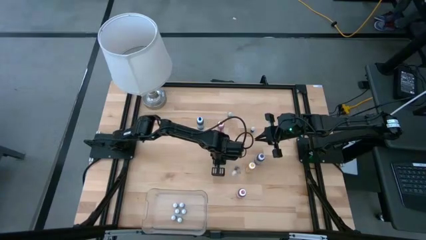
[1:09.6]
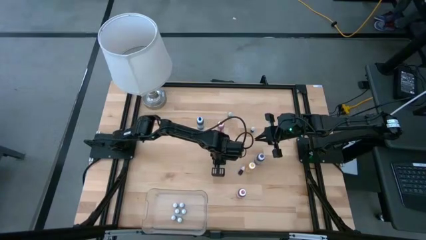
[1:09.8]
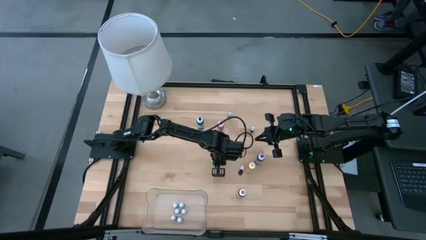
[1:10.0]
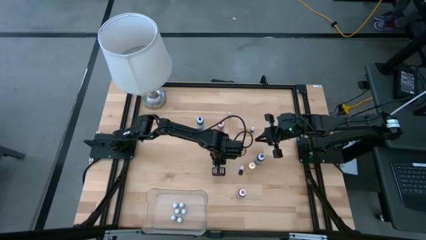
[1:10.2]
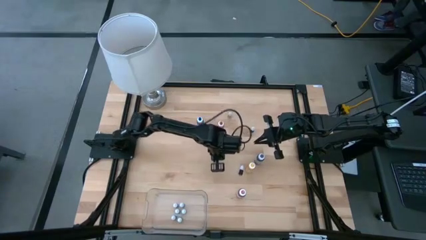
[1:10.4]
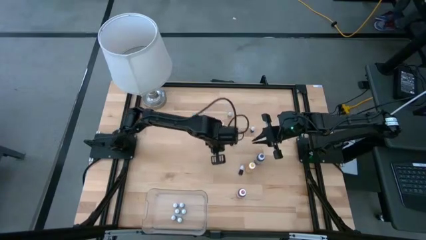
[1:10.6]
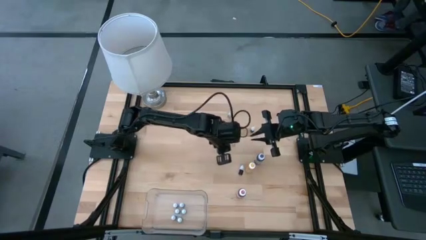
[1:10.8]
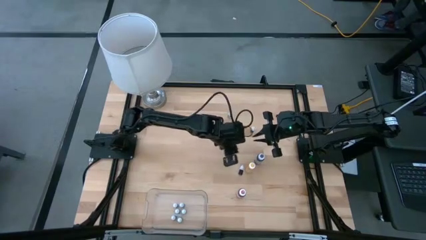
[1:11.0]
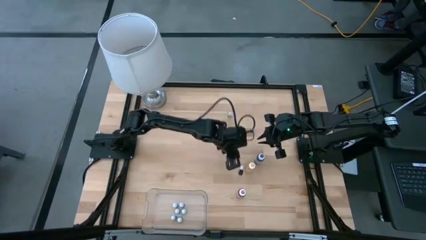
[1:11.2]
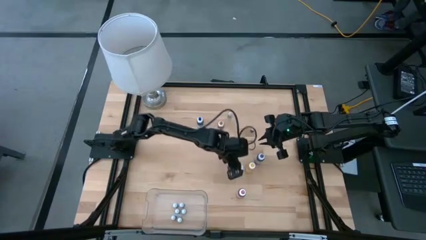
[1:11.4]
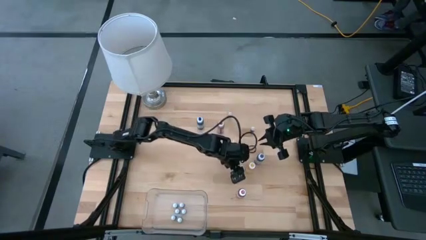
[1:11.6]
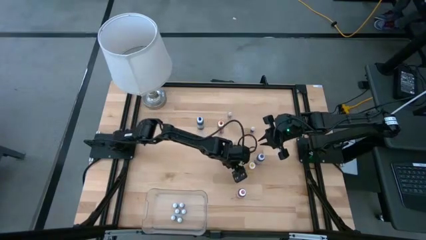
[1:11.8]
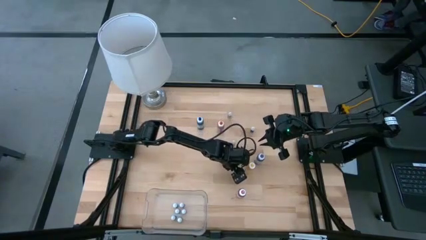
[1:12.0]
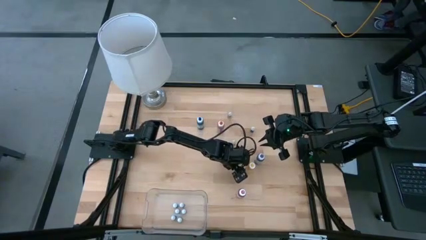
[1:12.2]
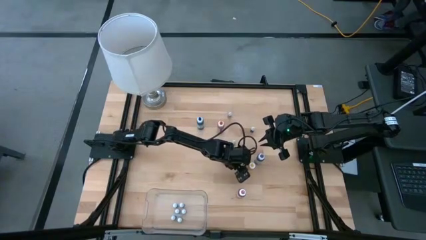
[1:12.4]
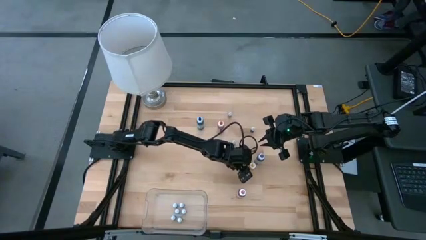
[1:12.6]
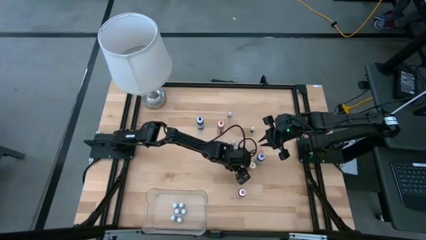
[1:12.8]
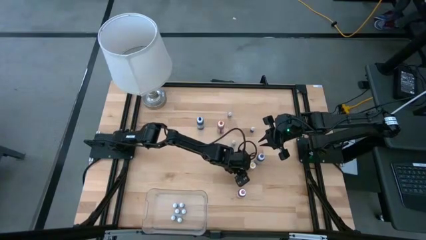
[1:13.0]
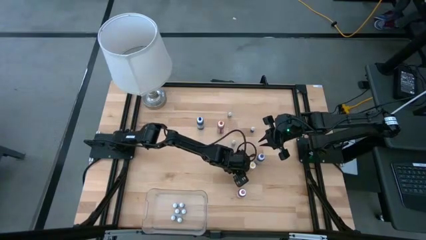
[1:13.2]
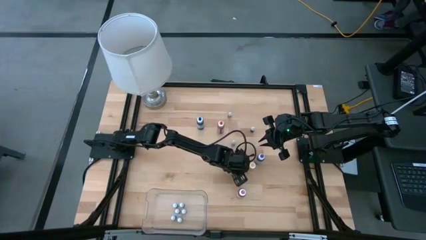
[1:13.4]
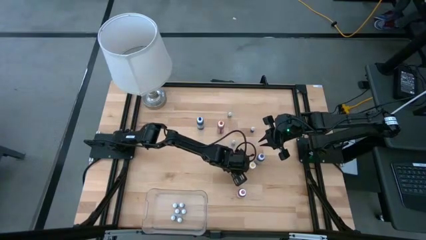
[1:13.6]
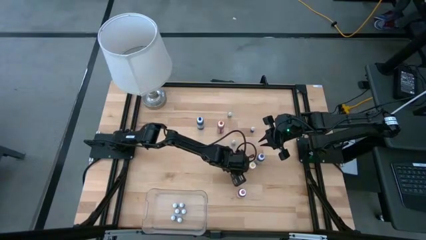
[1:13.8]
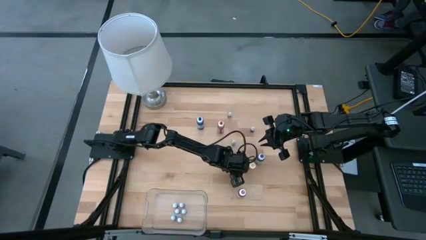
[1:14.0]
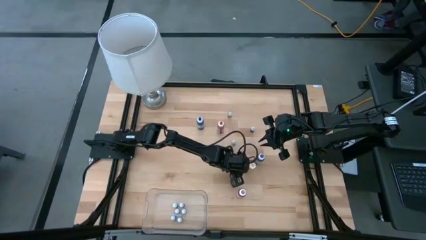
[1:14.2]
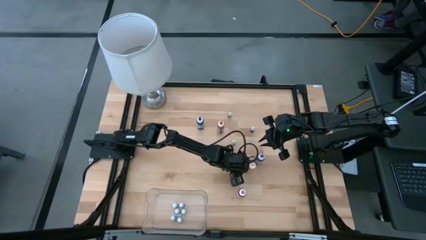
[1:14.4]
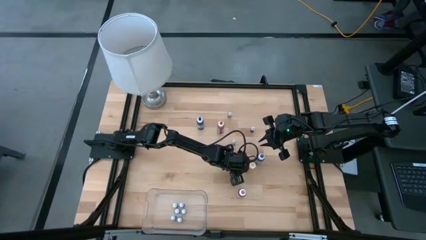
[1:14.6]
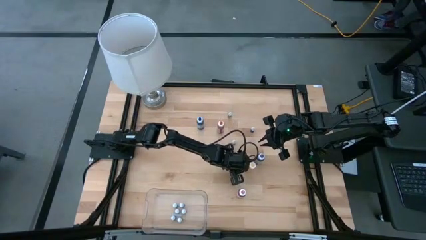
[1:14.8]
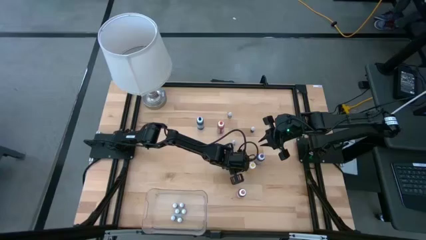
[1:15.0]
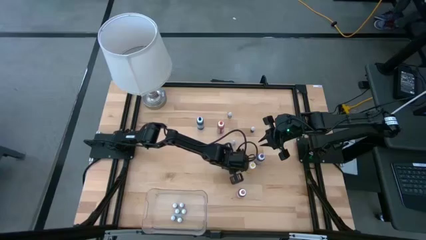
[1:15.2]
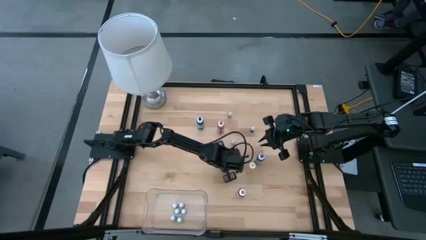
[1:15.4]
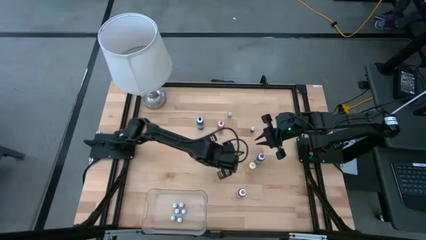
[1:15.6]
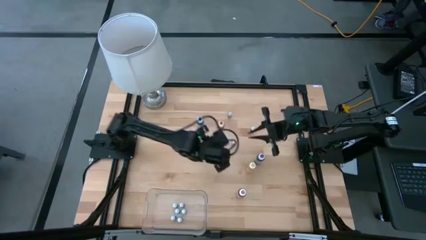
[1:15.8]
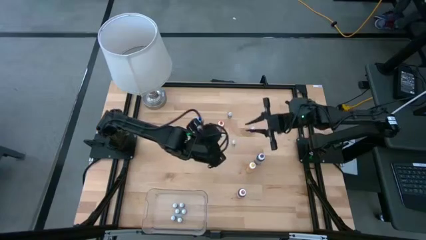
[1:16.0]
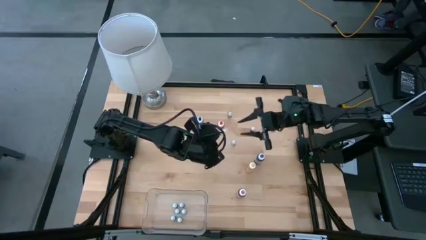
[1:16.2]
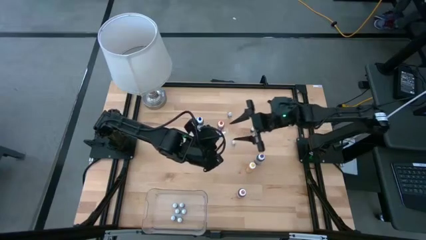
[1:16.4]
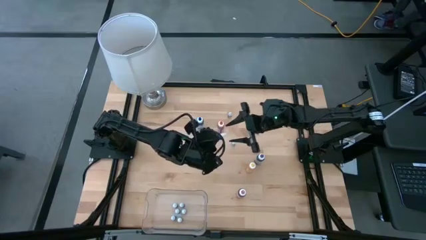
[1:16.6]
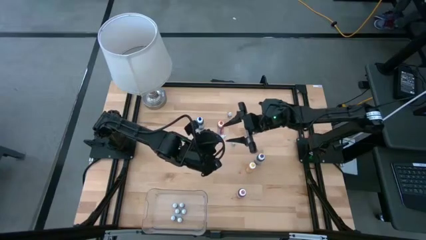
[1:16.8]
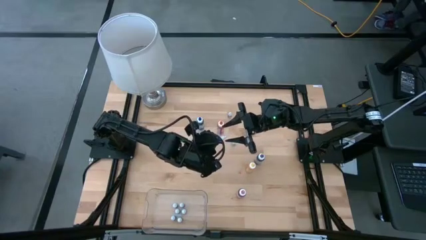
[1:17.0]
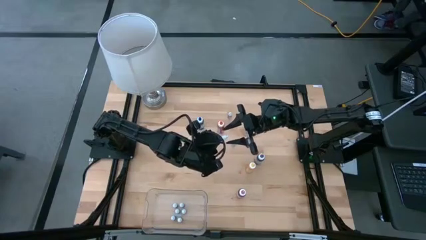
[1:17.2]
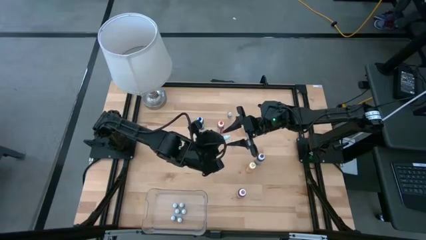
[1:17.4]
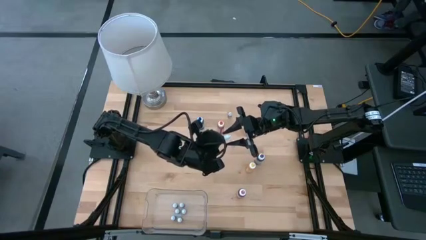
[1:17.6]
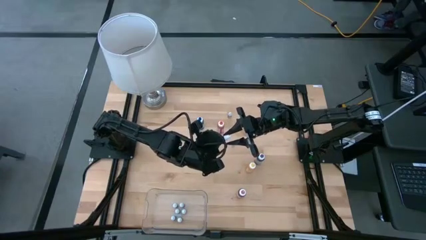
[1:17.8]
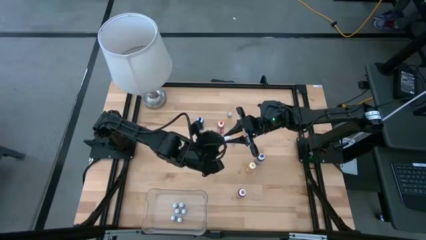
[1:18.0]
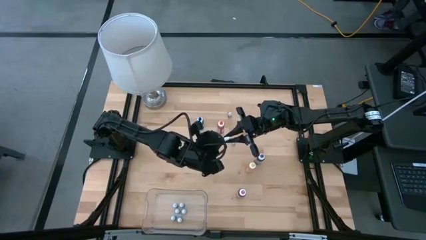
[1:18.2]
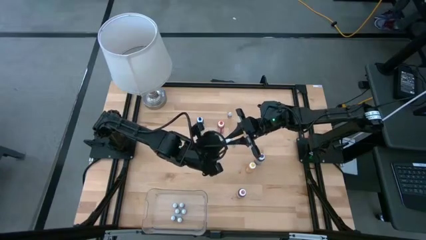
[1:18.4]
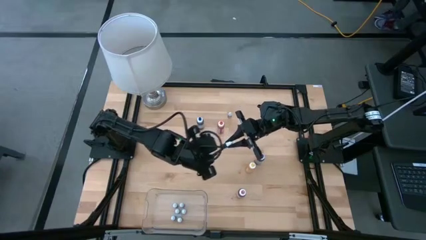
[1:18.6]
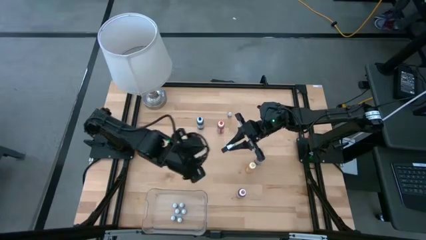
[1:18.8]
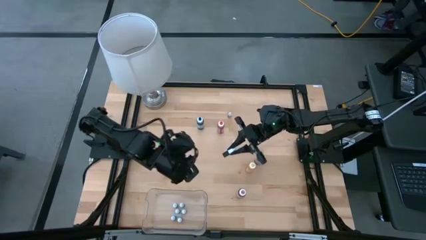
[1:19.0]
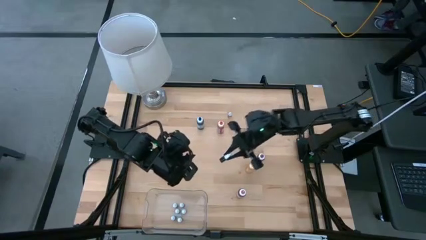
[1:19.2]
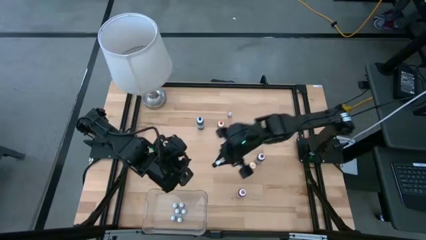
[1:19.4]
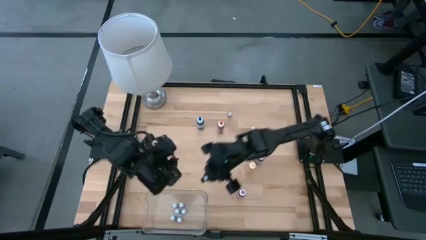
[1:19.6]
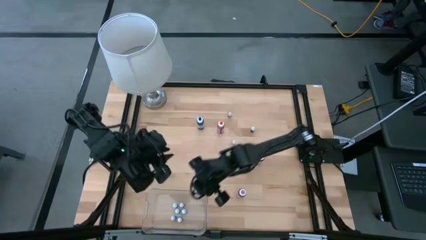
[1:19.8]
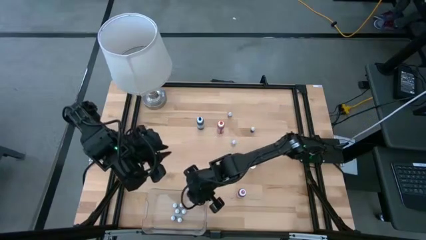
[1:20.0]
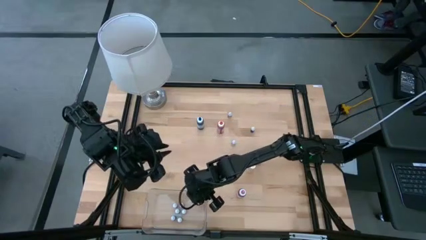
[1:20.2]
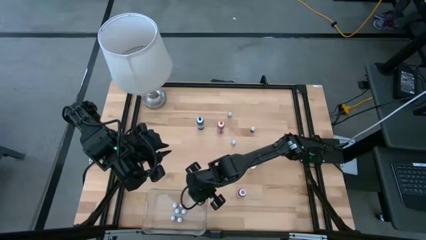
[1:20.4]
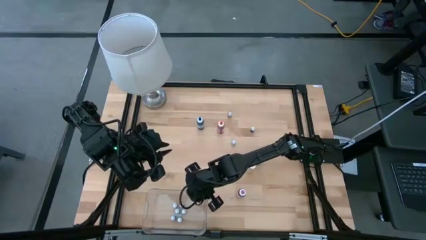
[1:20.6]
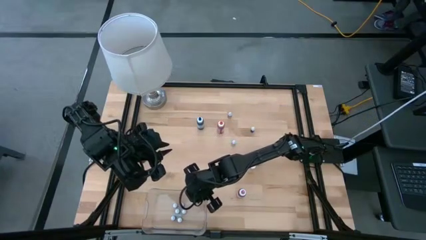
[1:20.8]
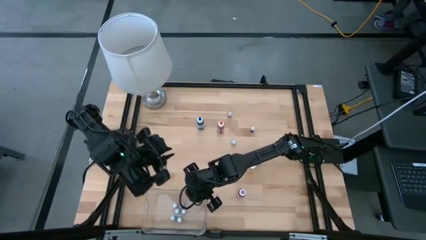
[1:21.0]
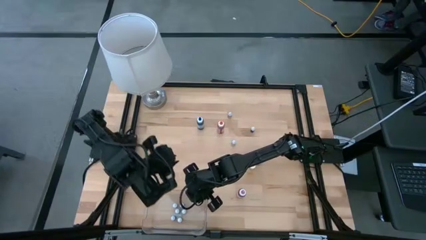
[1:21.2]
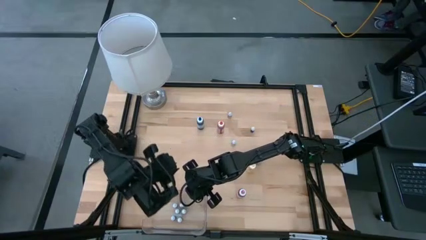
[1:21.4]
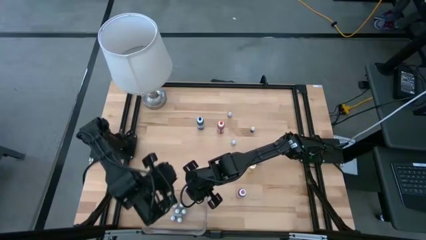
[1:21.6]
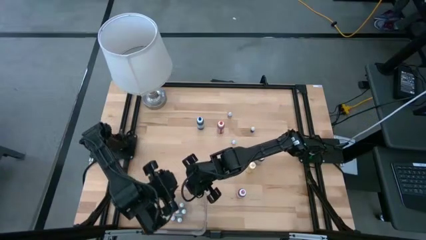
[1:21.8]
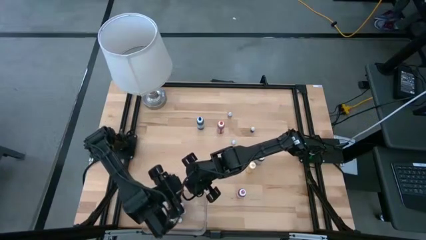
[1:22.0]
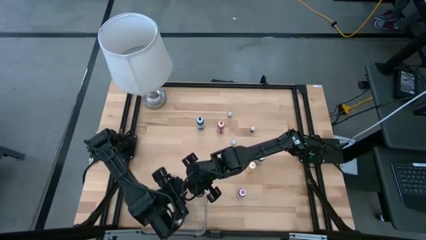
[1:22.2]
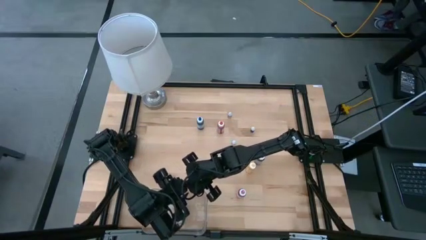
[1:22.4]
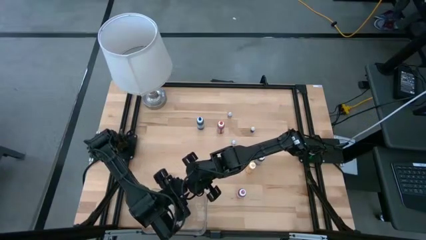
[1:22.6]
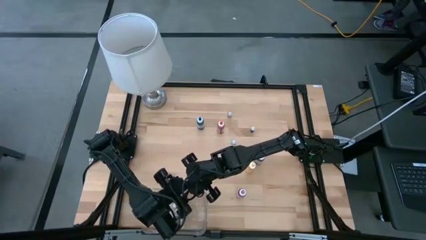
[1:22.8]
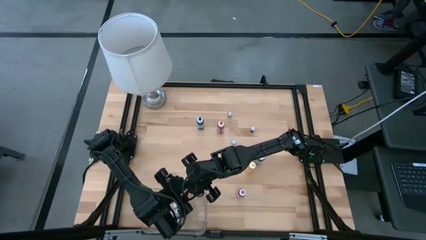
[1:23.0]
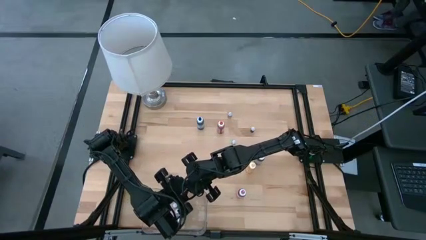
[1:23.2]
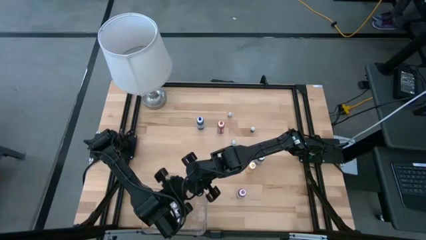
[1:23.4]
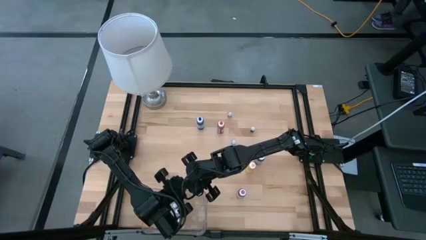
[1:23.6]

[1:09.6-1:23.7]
Task: Pick & Place food coloring
Put the small light green food coloring bottle into the bin

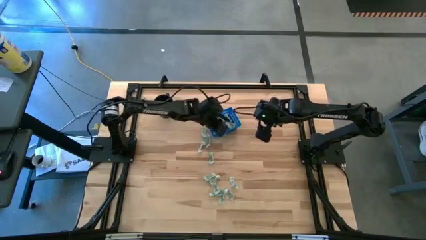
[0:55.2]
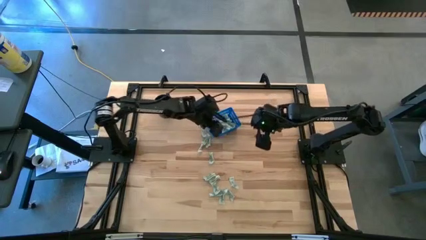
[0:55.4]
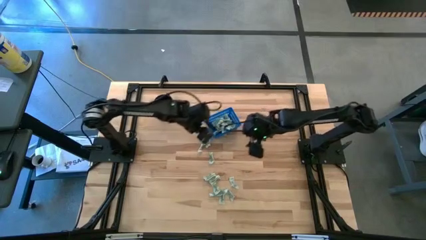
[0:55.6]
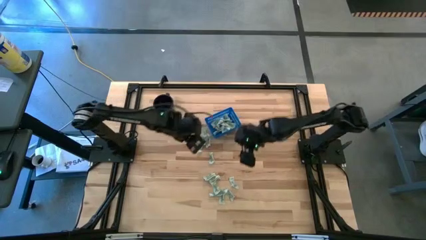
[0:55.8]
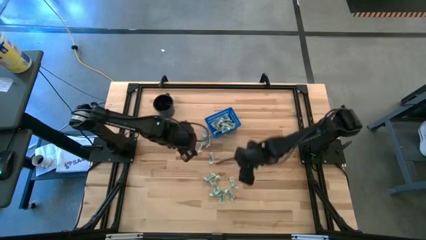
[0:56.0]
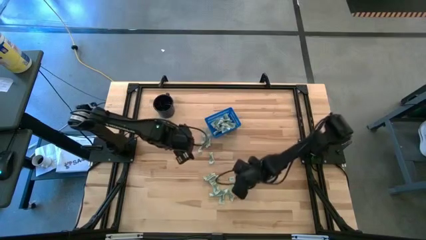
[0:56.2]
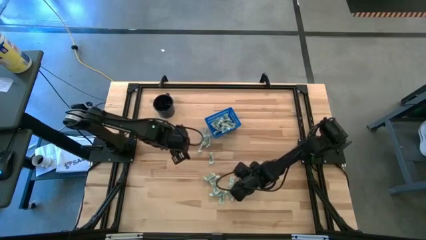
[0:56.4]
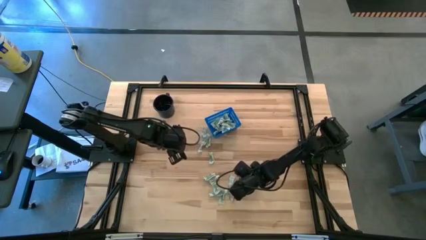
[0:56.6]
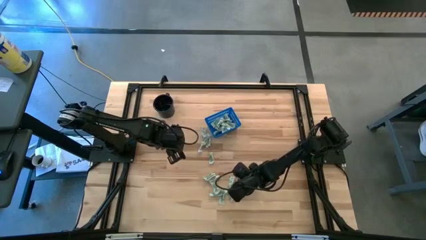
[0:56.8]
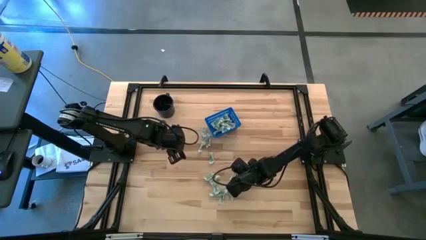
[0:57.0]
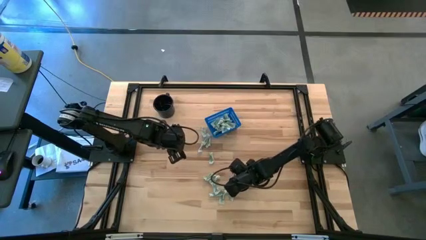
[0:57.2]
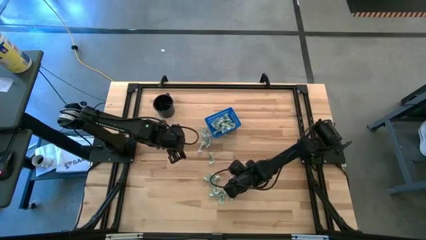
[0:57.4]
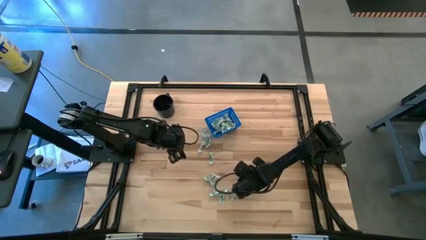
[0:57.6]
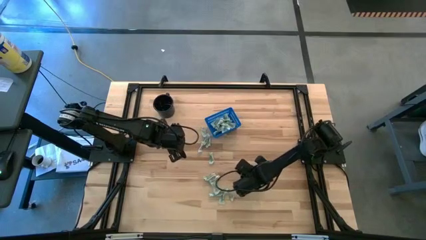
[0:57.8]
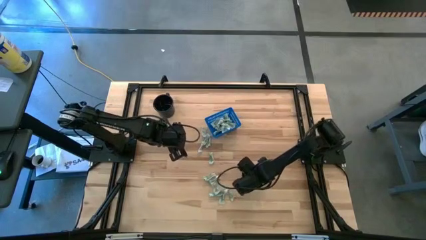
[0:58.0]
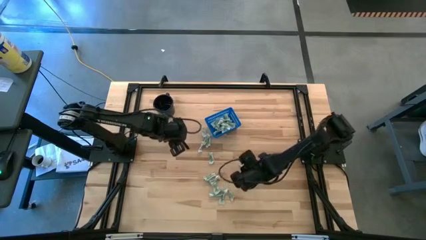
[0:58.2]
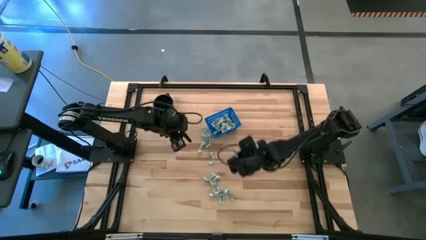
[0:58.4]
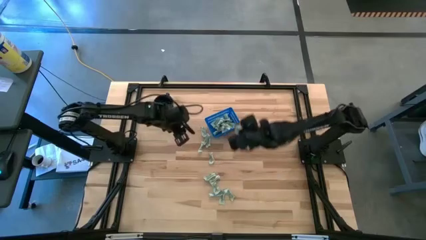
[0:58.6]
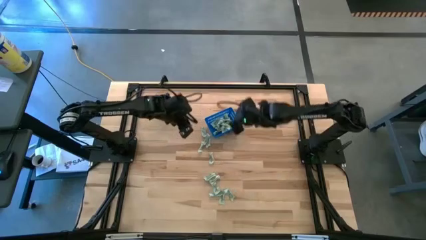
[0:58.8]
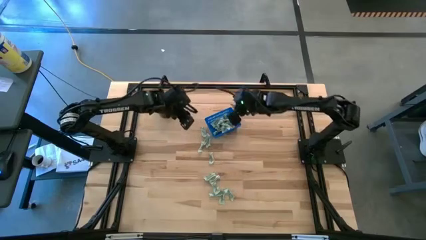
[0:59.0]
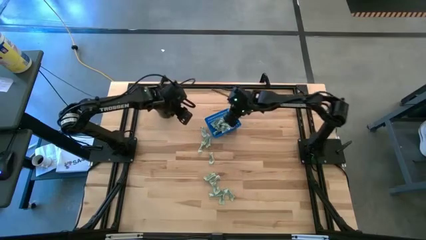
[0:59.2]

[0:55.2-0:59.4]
Task: Pick and place Stevia / Truvia into bins
Put the green stevia packet into the blue bin
